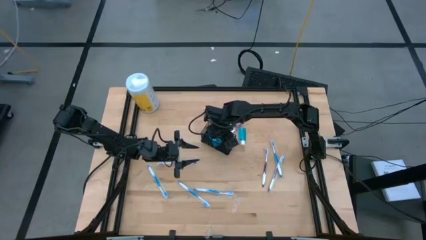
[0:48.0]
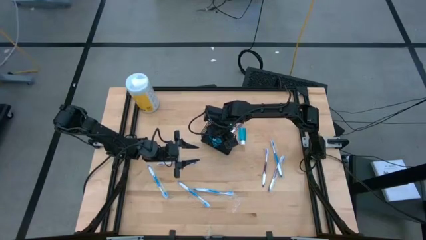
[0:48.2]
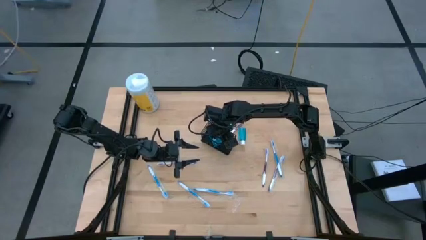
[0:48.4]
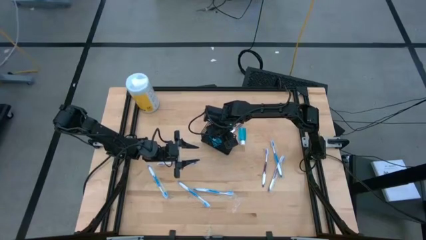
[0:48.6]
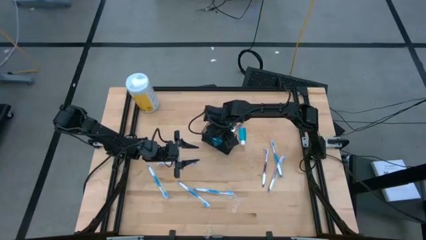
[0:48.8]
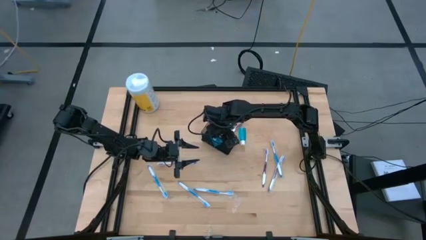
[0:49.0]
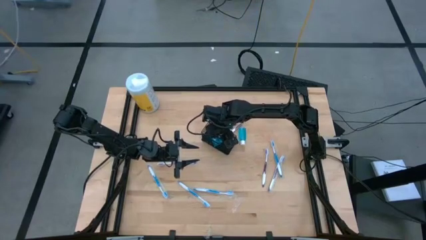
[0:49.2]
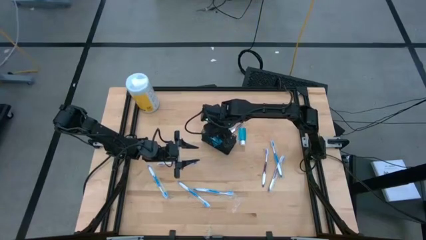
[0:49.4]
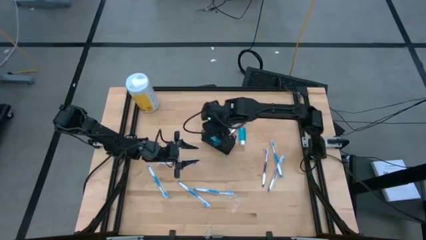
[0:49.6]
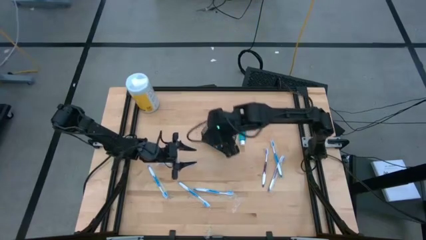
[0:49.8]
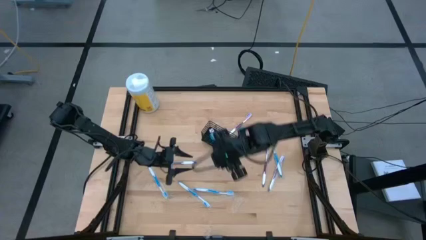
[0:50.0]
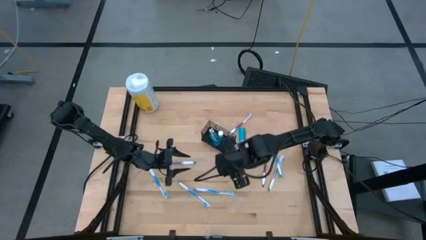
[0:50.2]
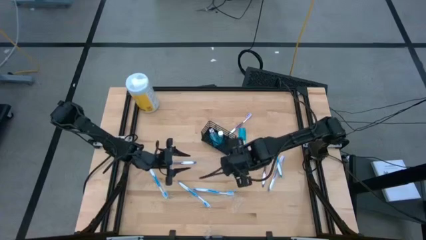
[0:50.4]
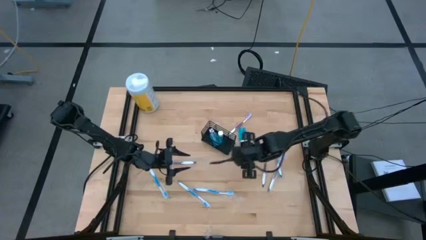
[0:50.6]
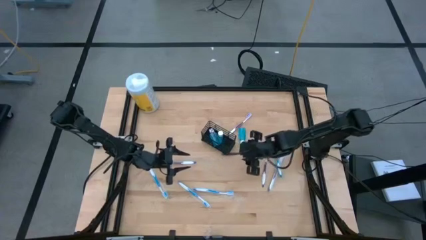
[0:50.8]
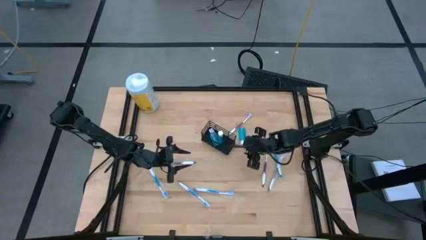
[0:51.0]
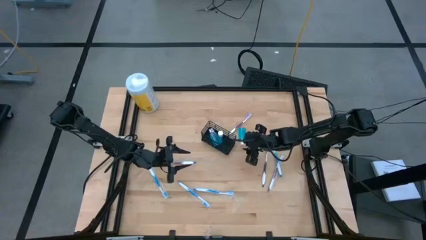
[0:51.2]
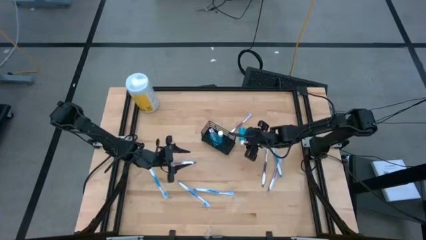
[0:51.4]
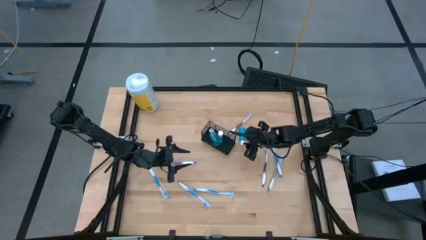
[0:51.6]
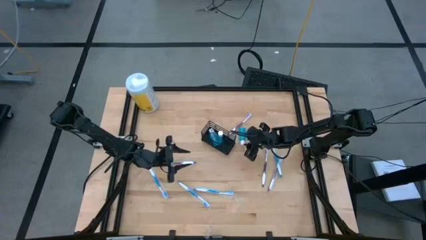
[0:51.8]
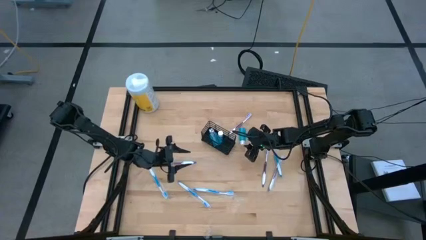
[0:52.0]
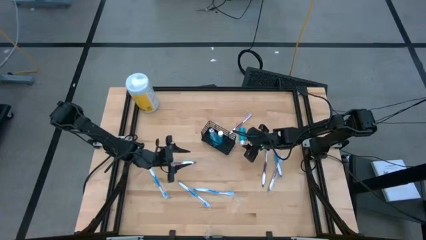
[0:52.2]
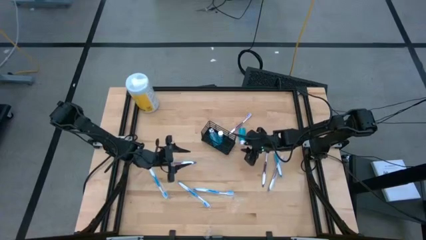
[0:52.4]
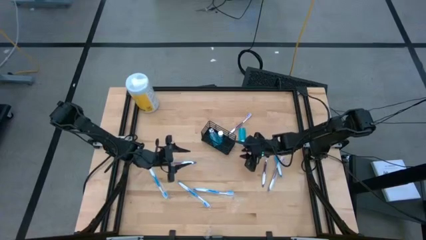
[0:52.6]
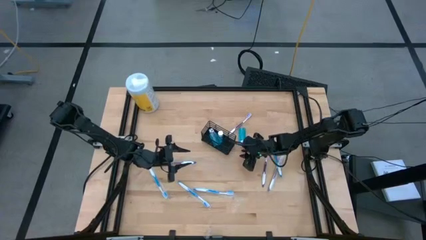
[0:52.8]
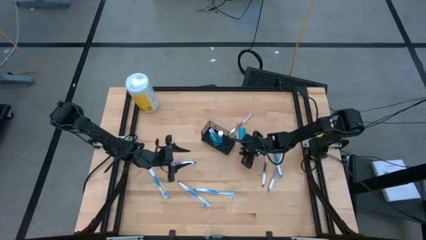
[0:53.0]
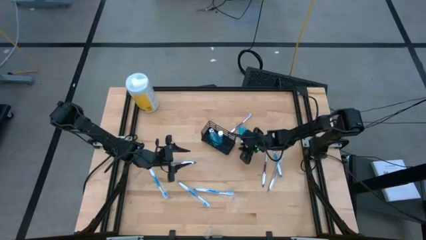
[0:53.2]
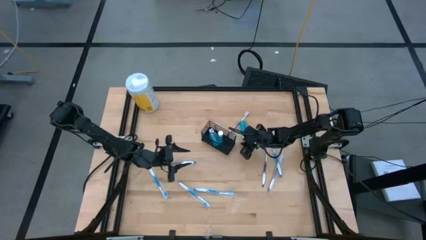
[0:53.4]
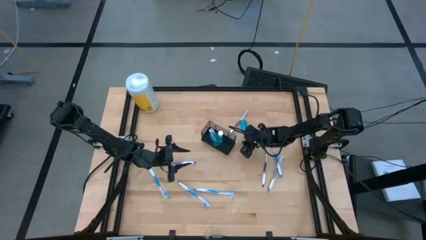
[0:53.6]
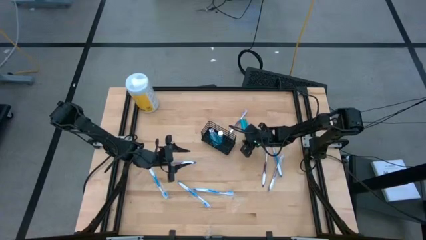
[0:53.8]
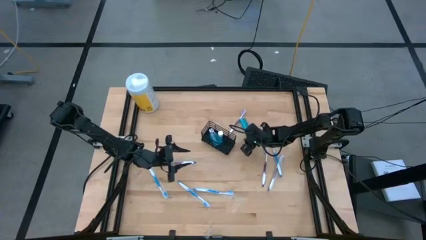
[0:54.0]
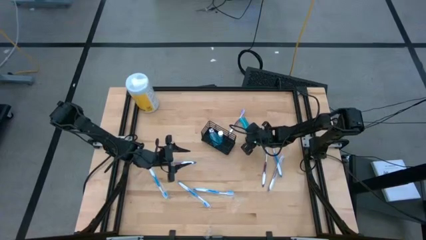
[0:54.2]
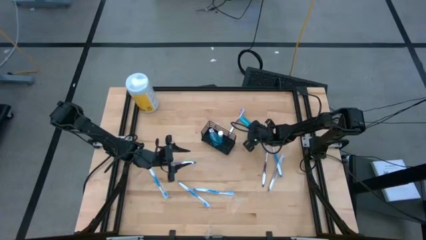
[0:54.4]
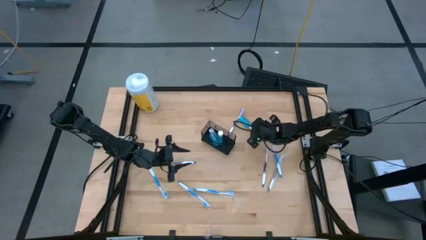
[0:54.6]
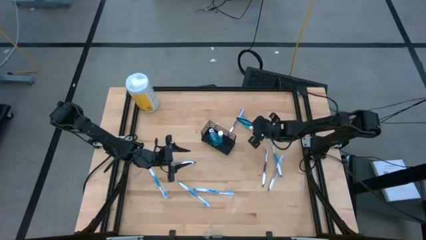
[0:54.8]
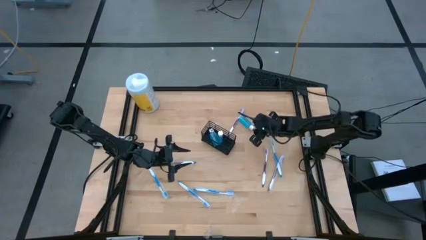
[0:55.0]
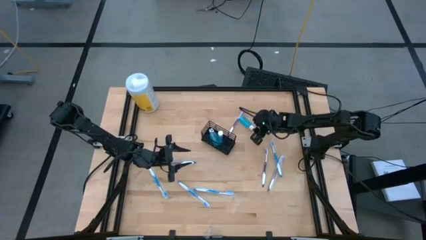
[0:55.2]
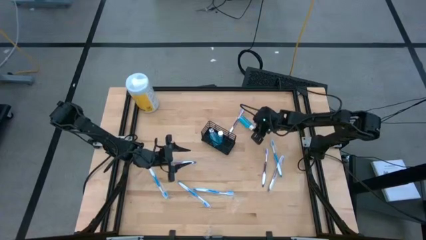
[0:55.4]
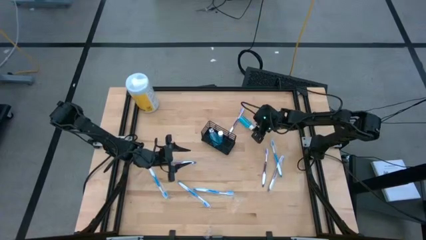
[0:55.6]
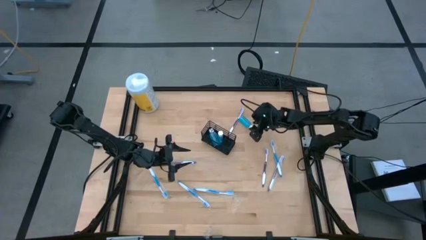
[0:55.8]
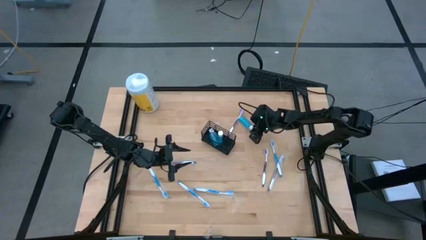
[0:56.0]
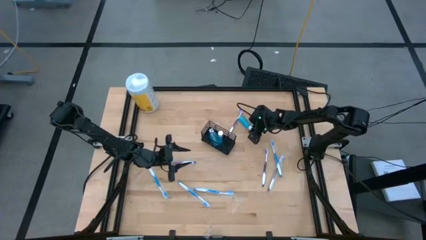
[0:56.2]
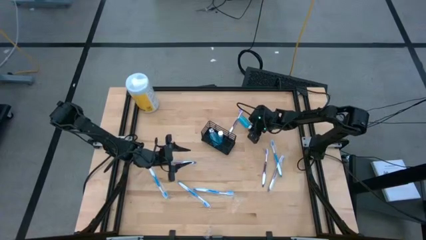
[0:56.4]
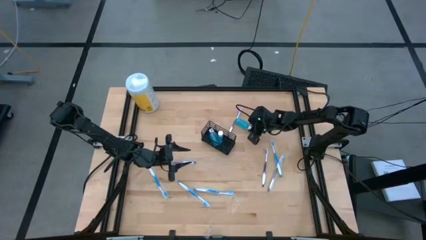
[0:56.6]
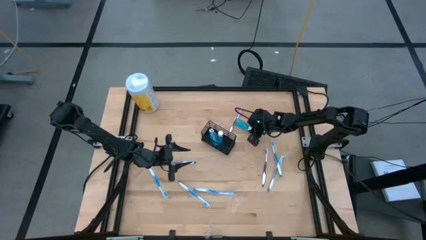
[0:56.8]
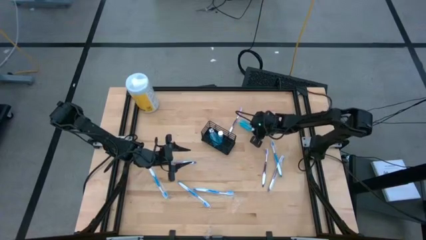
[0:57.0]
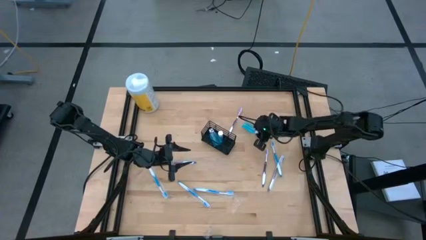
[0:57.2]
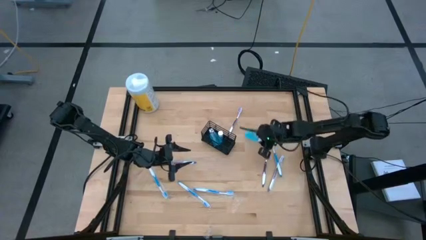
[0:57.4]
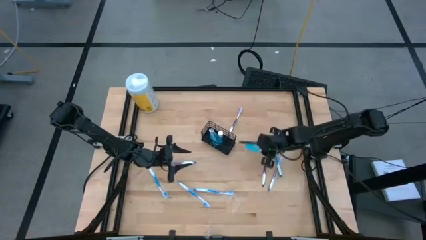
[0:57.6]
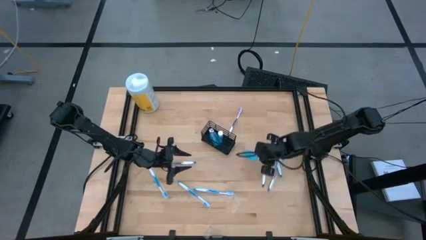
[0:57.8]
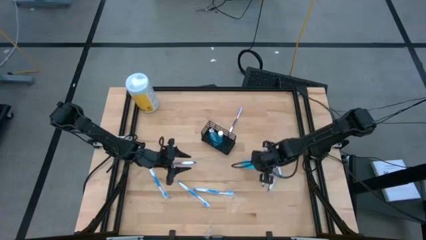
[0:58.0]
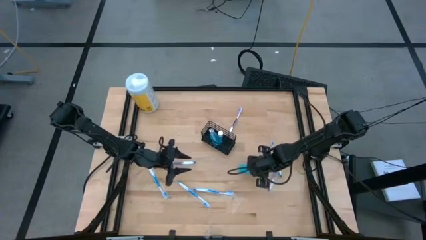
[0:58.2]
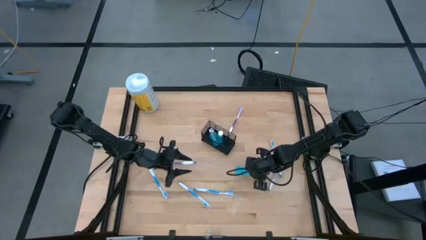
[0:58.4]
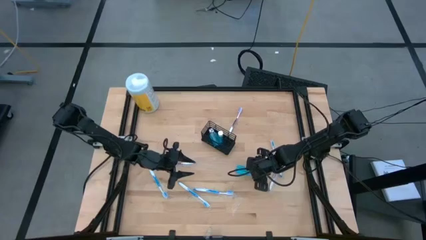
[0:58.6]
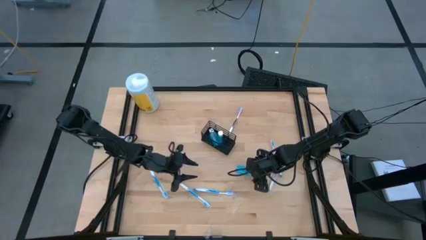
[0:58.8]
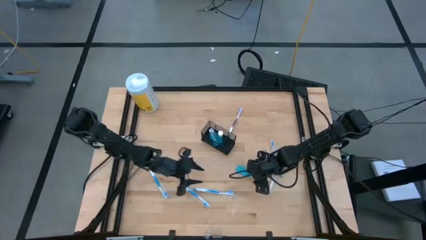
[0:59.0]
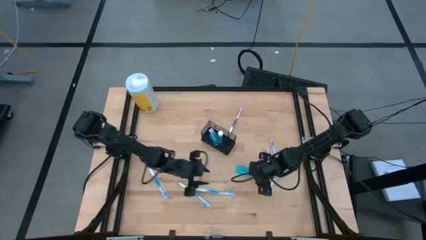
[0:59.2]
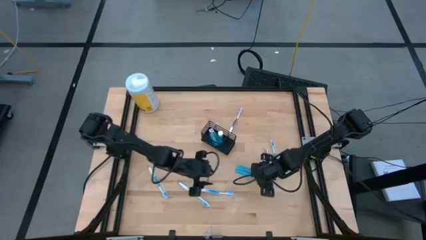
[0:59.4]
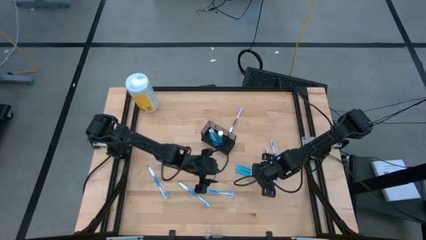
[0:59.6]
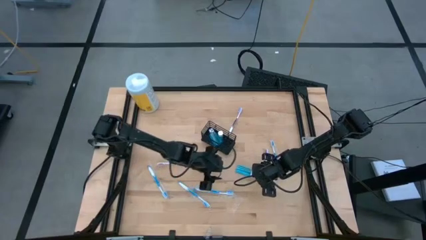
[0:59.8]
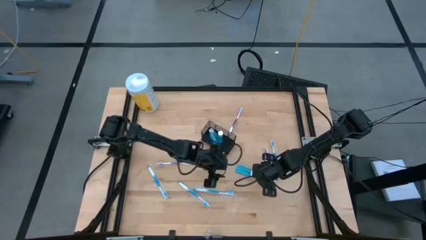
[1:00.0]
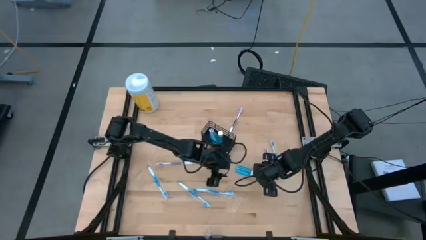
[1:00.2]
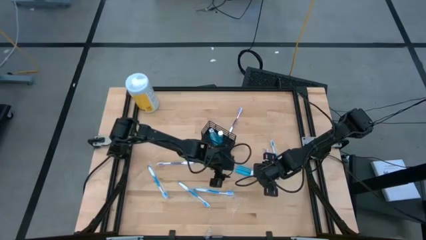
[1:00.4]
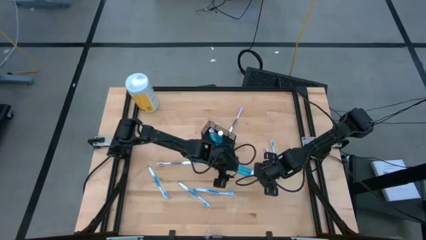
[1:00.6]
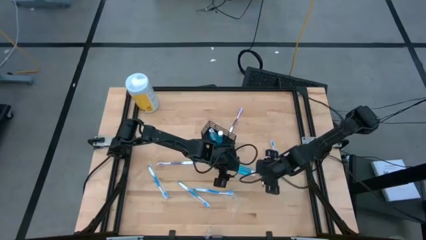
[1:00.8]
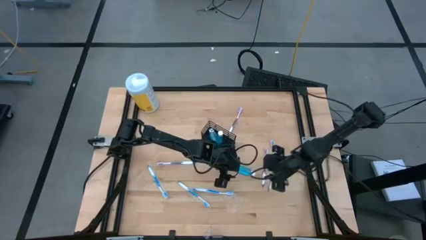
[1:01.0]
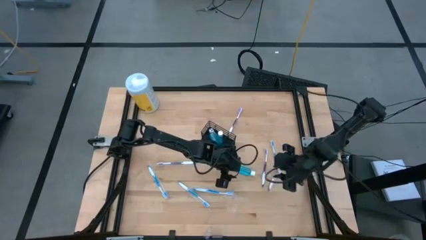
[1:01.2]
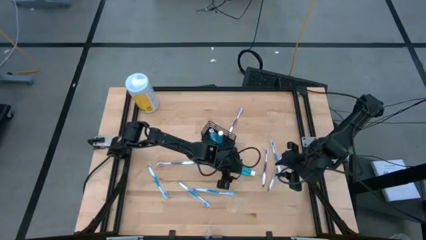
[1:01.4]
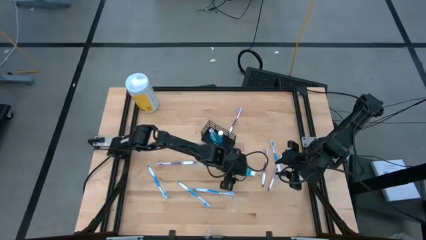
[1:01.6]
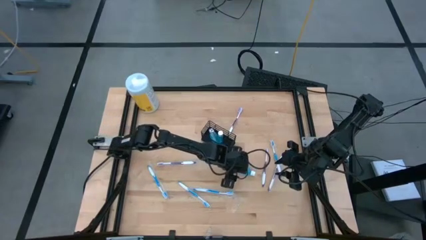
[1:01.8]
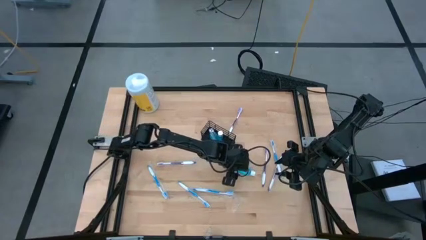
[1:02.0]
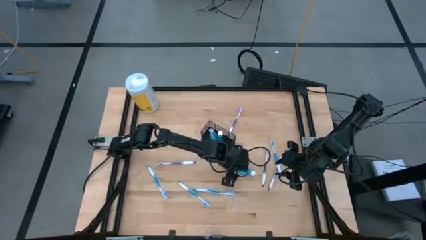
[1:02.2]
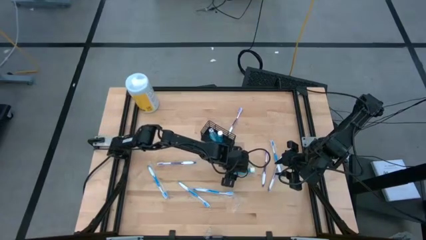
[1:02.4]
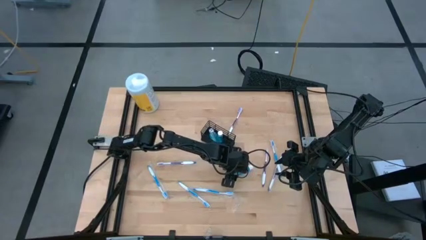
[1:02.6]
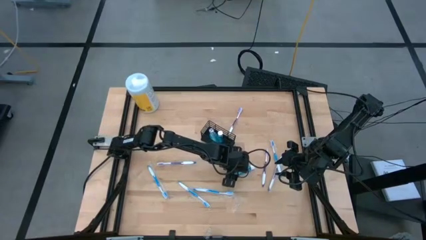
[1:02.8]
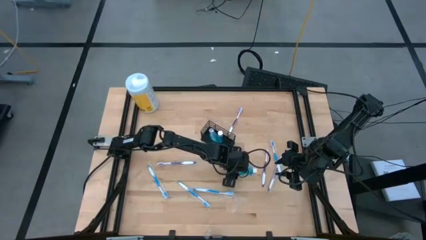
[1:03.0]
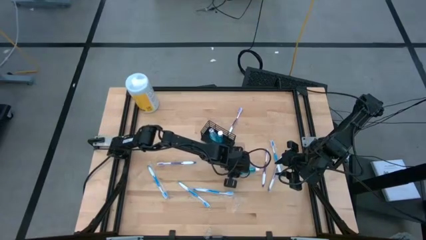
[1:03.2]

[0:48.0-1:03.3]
Task: Pick & Place toothbrushing station
Put the blue mouthwash into the wire organizer

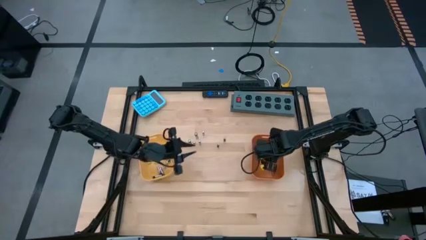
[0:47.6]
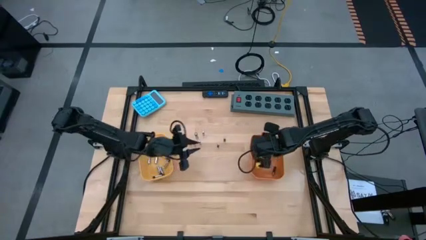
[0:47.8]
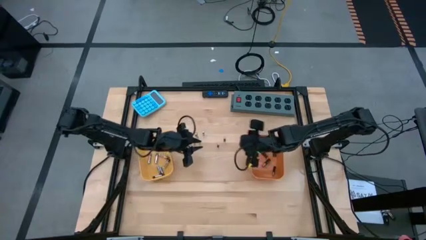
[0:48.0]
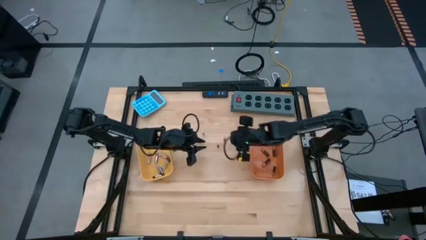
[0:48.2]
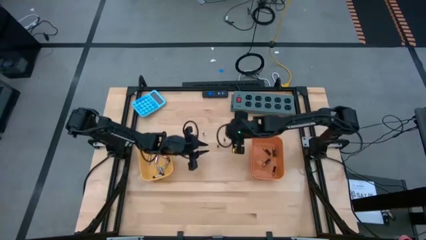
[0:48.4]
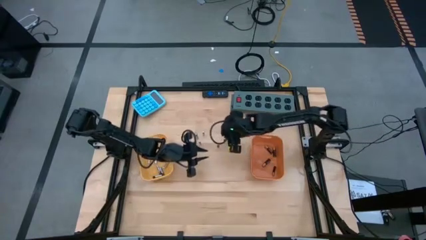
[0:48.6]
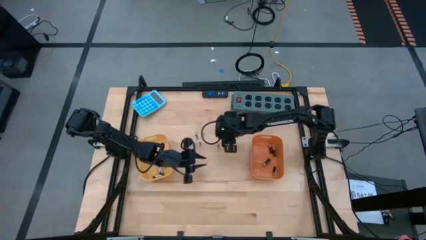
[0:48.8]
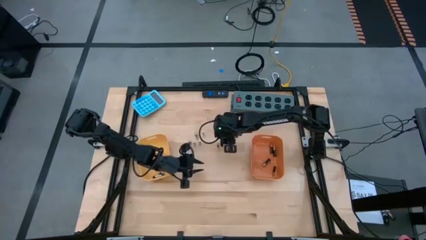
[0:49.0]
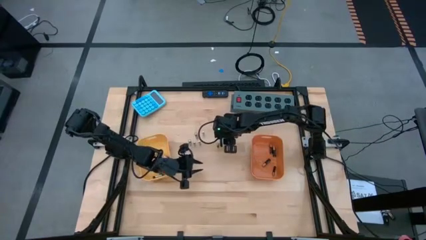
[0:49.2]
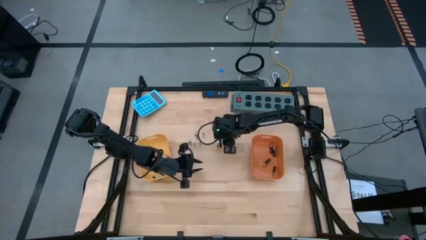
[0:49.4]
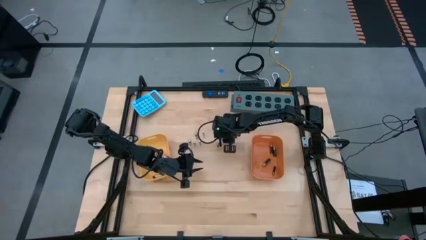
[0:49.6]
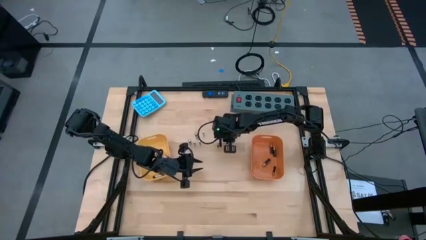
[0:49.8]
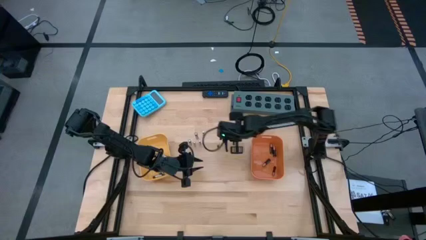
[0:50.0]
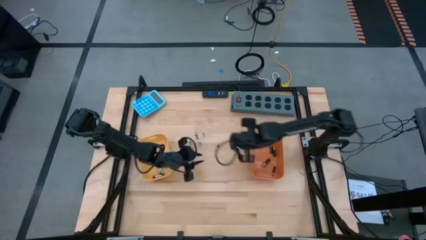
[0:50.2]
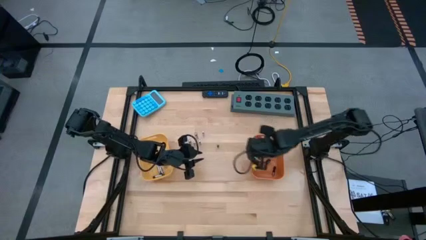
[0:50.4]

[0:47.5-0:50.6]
Task: Sort batteries
Put the brown battery into the orange bin
